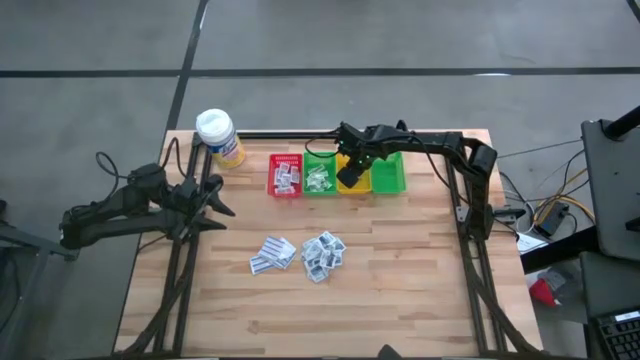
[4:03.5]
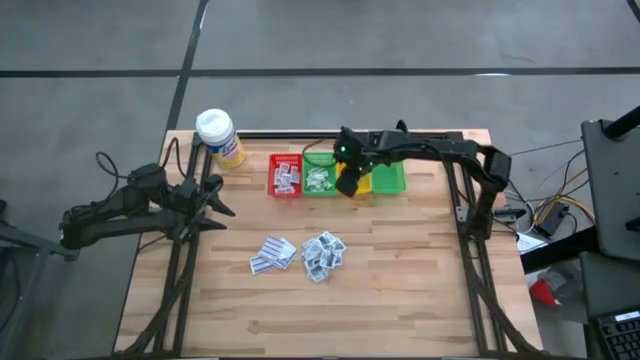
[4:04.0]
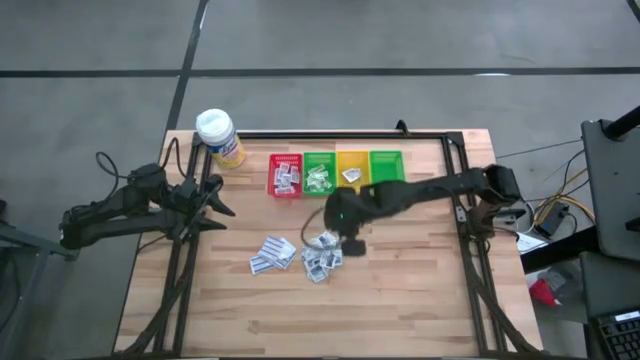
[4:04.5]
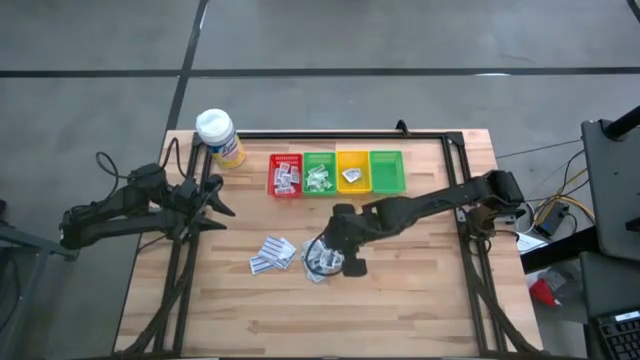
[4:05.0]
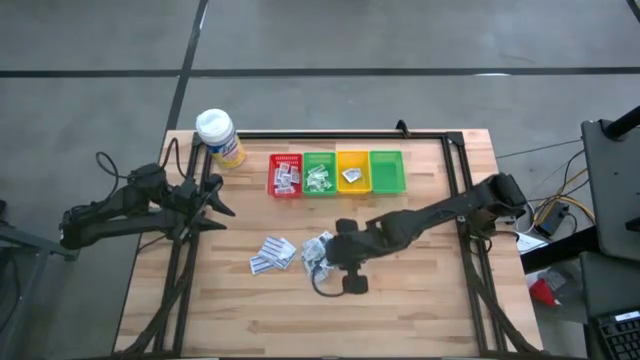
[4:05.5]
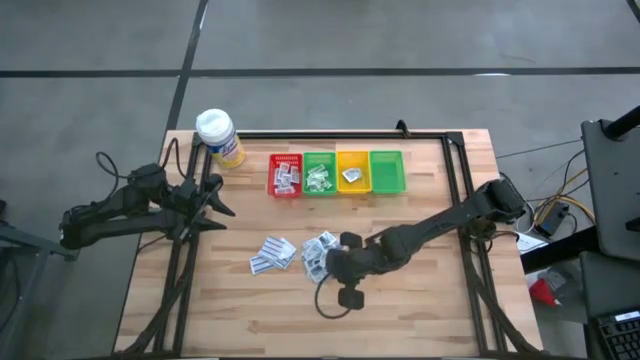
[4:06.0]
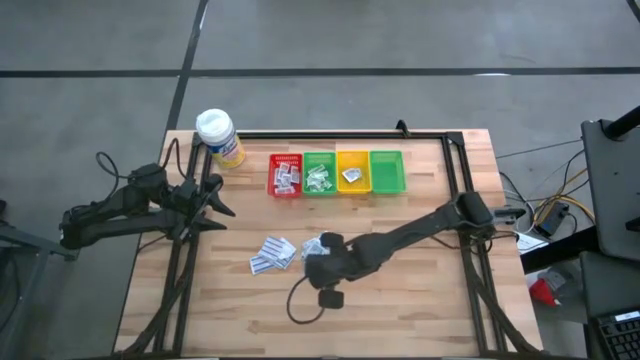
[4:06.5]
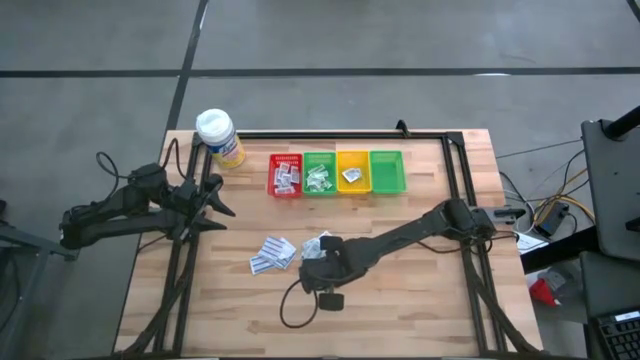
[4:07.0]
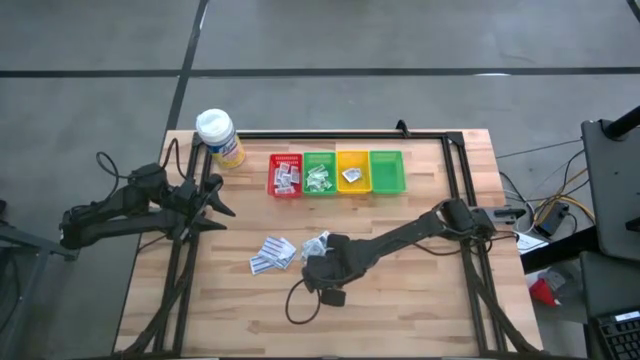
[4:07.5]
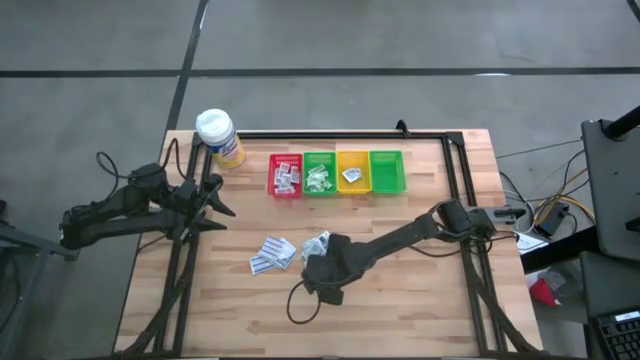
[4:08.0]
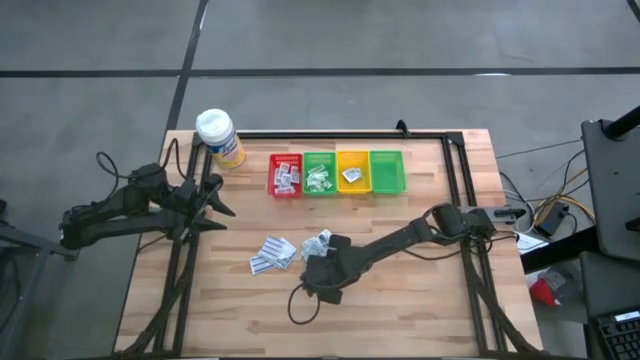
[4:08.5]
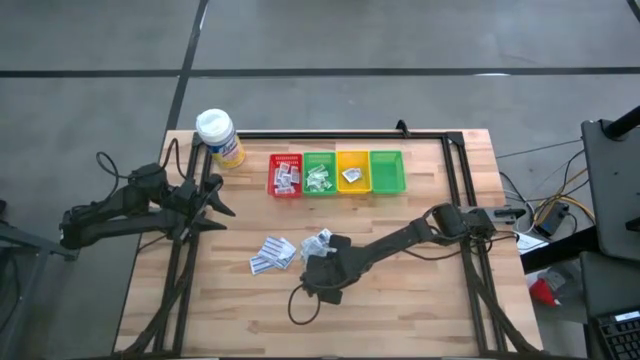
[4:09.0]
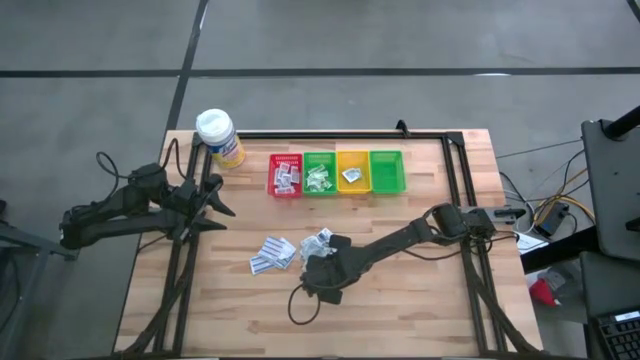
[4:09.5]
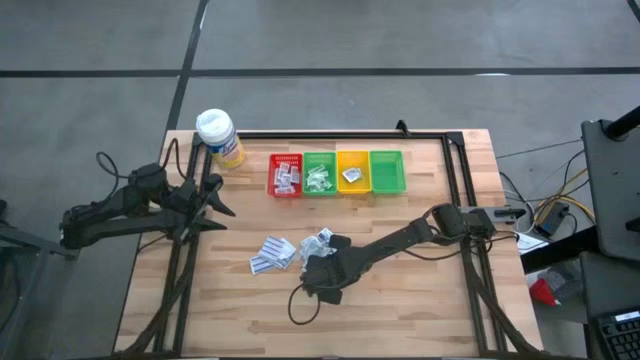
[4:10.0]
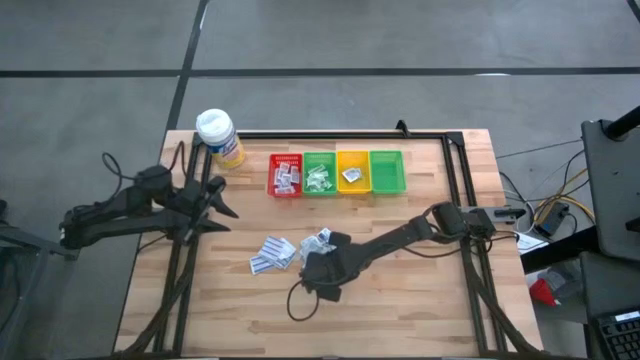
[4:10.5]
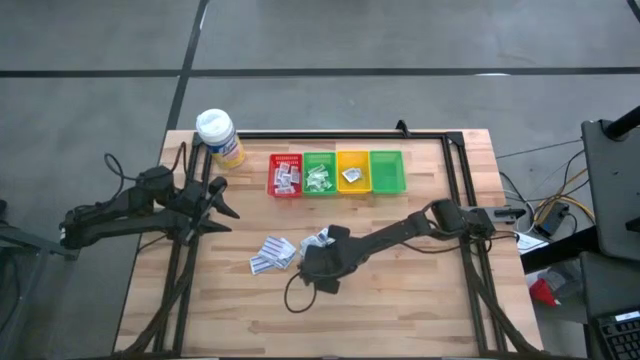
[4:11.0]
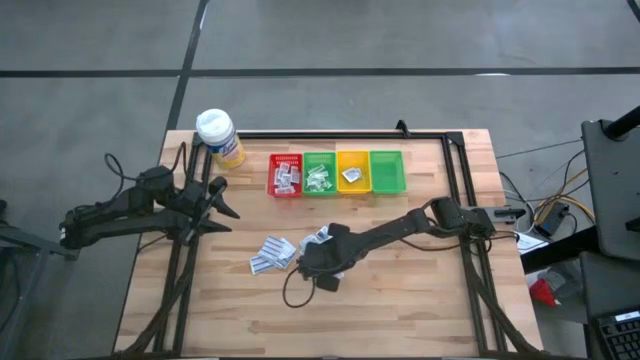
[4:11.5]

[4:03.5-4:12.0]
Task: Pick & Place First Aid Supplies
Put the alcohol pad into the yellow bin

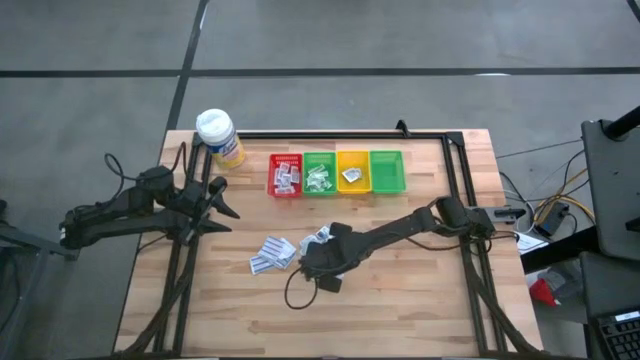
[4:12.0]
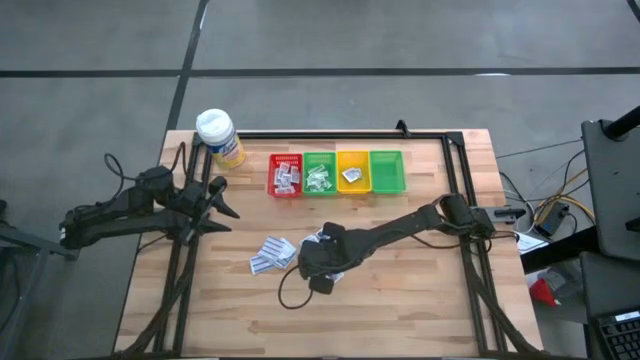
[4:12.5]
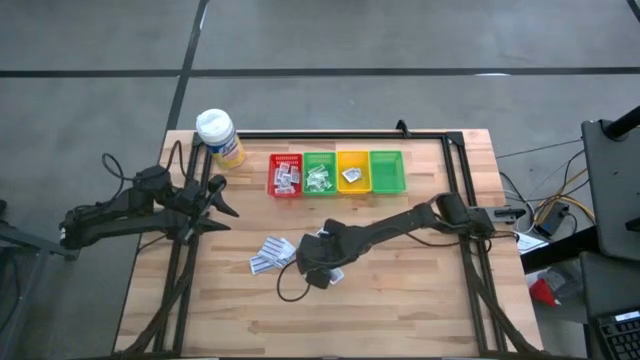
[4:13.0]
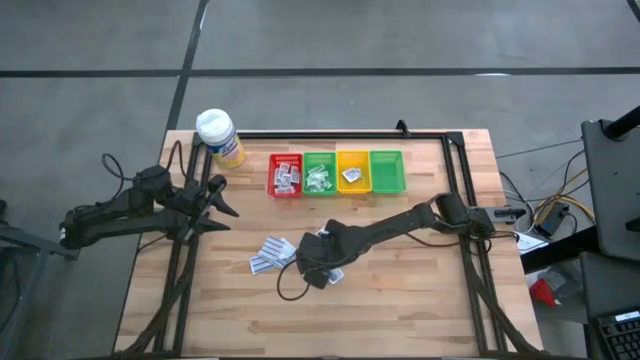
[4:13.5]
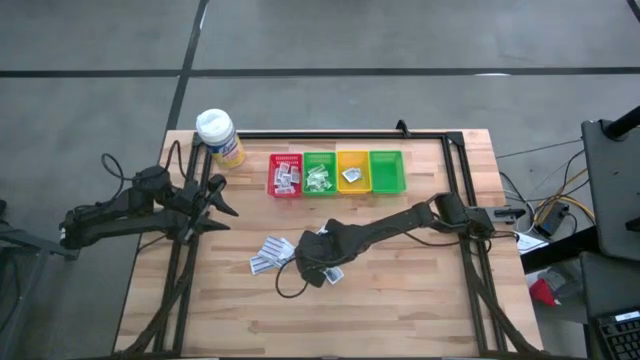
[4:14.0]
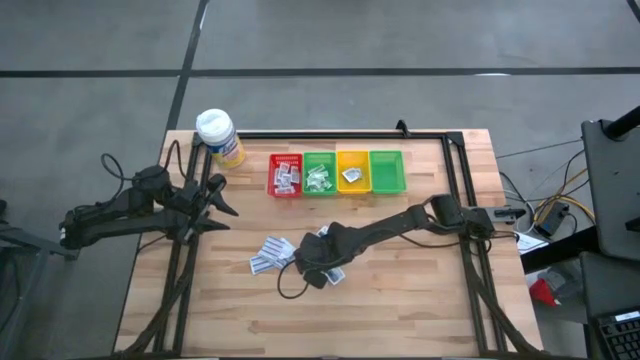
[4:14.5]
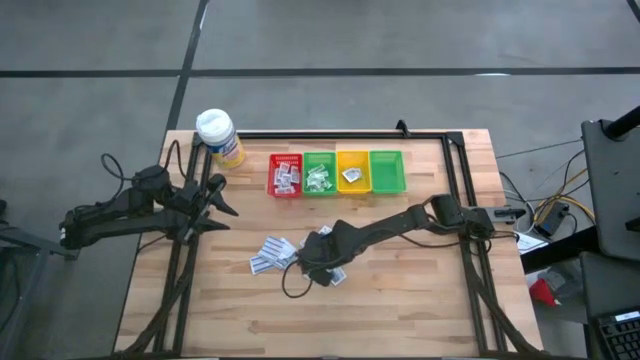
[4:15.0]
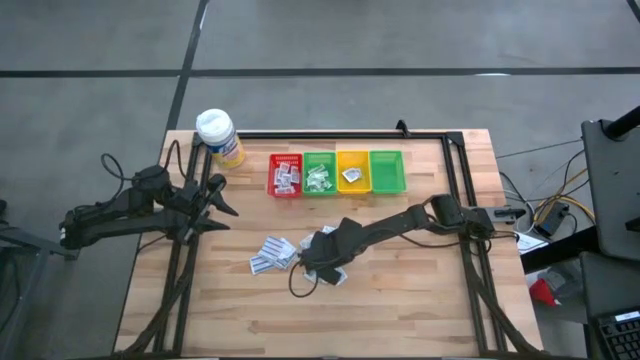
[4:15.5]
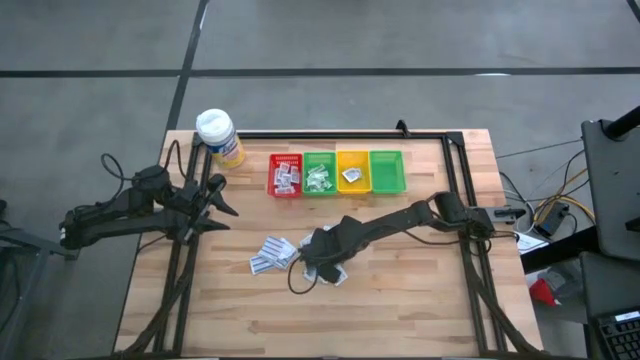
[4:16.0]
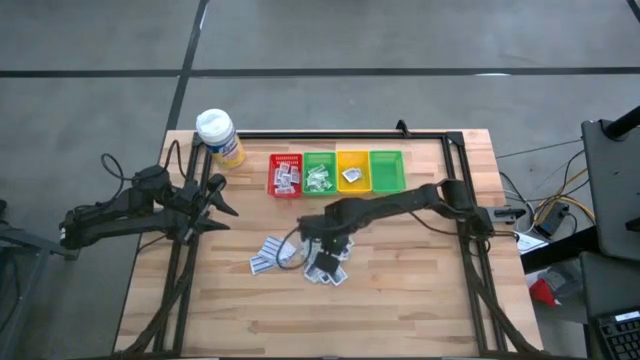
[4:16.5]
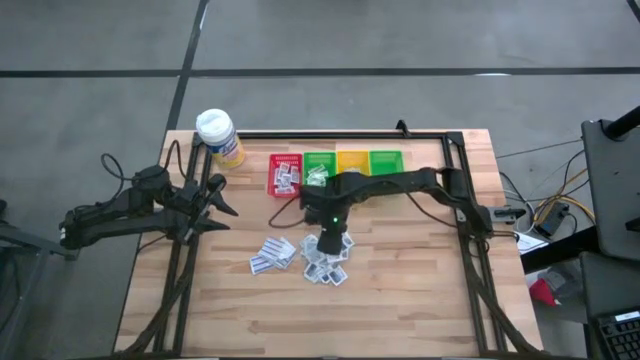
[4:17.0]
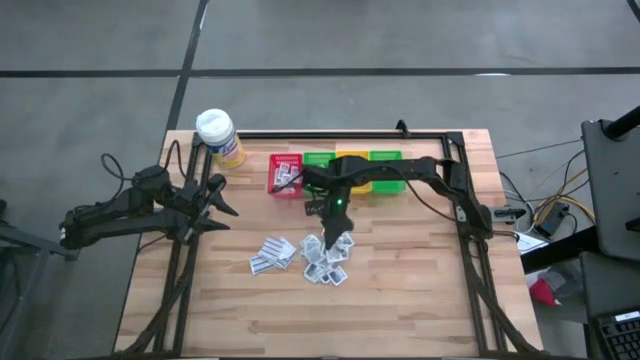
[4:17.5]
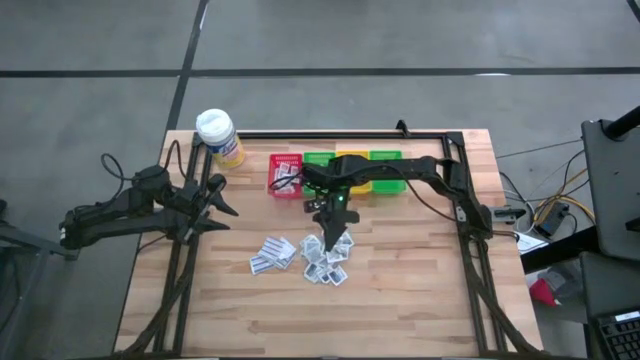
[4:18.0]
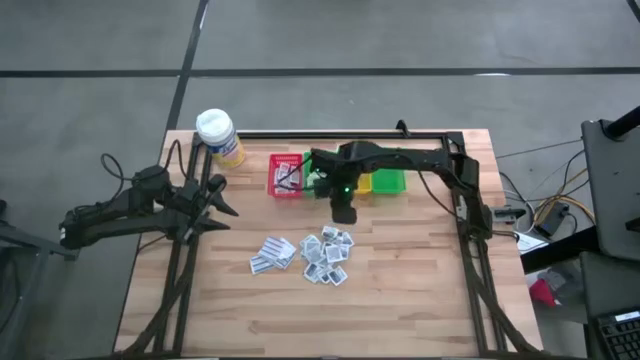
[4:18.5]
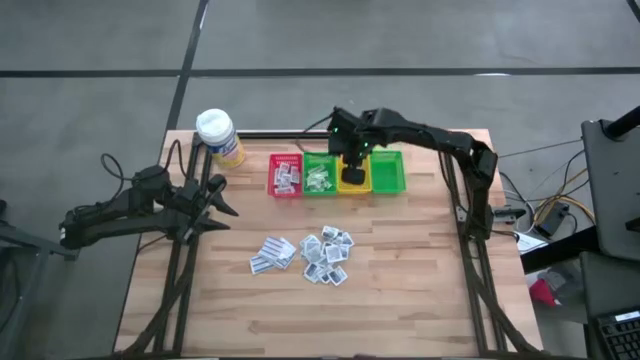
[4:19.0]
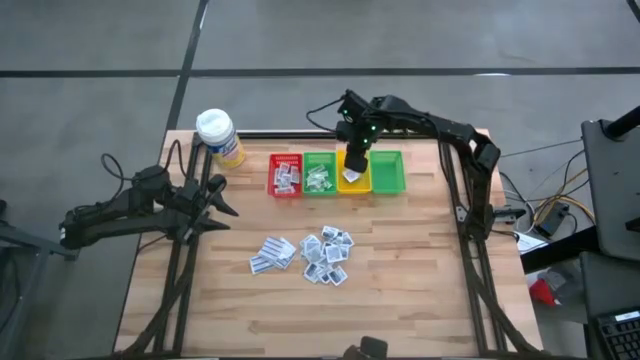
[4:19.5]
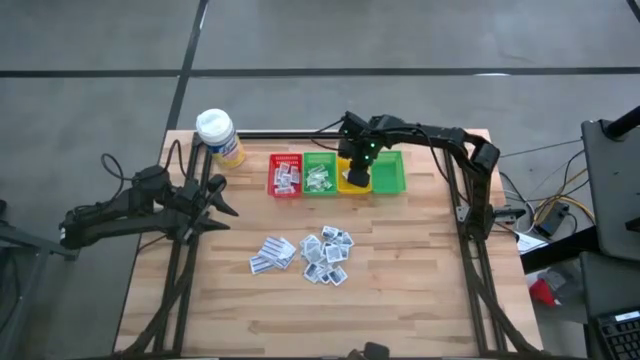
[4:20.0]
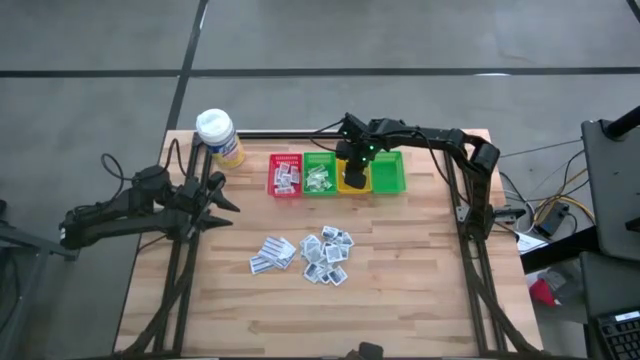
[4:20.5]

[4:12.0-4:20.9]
Put the alcohol pad into the yellow bin

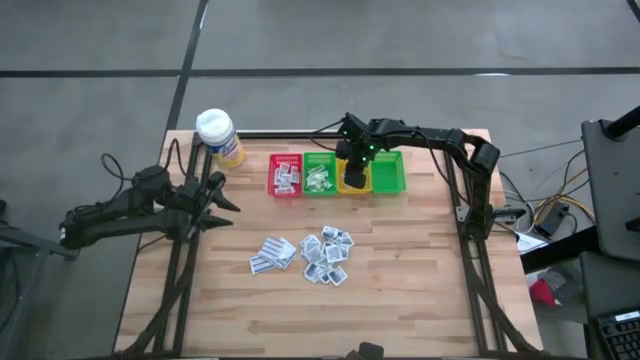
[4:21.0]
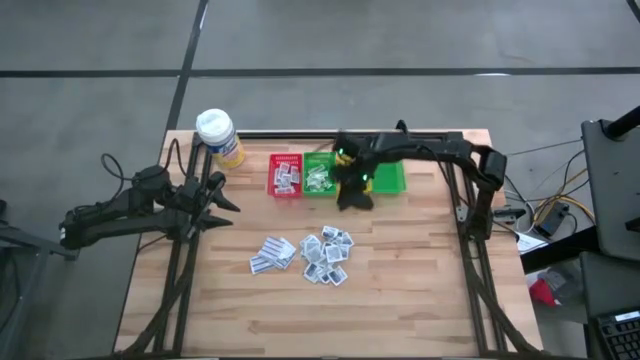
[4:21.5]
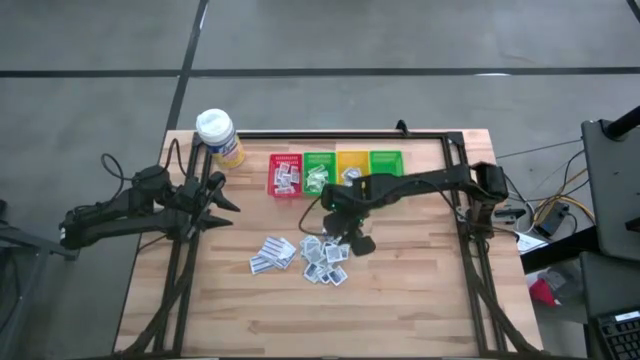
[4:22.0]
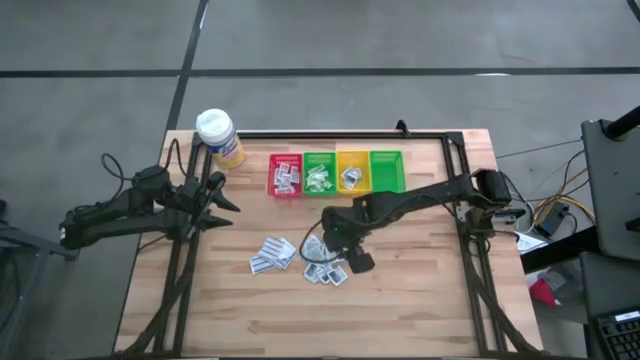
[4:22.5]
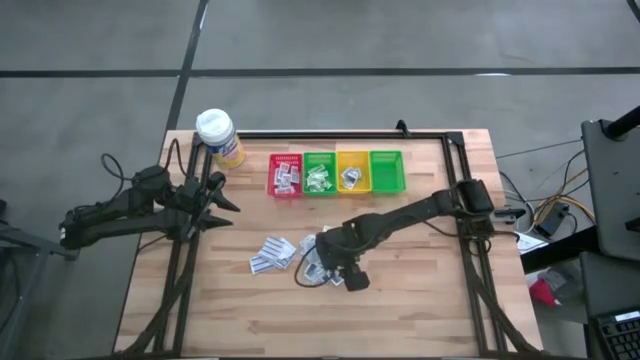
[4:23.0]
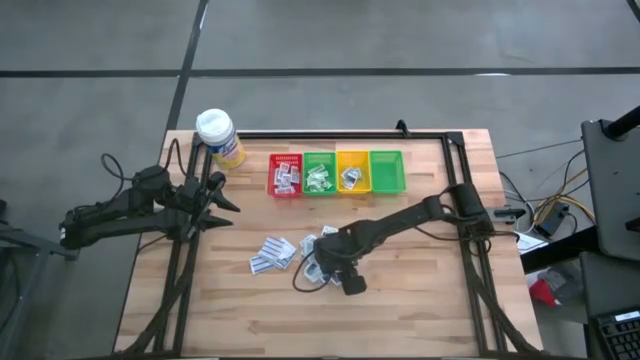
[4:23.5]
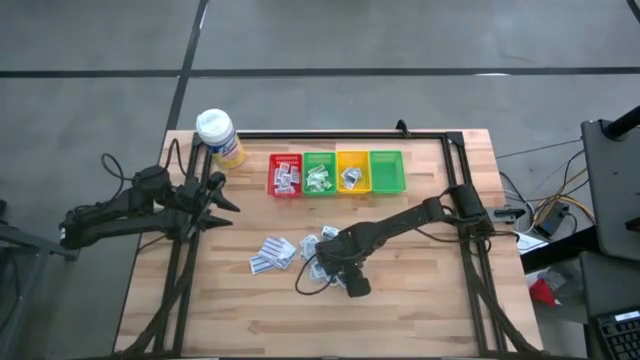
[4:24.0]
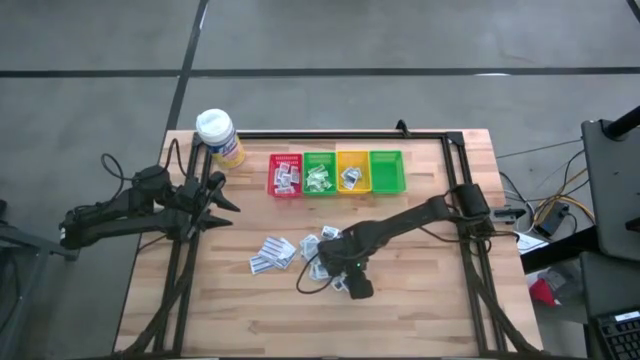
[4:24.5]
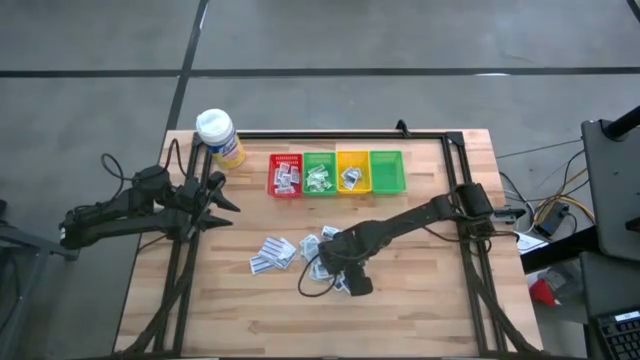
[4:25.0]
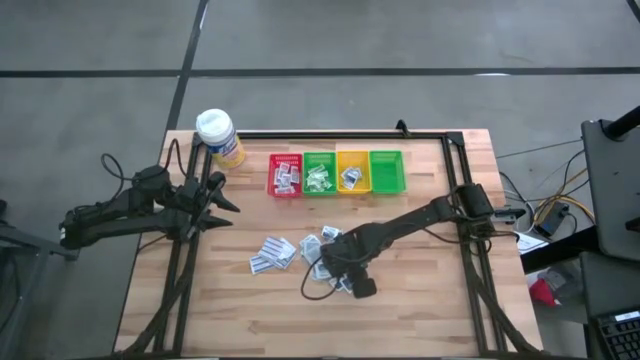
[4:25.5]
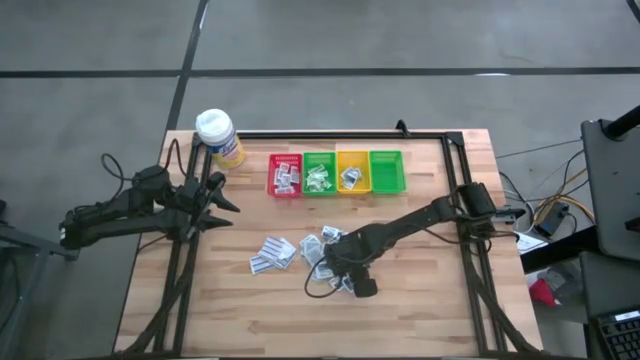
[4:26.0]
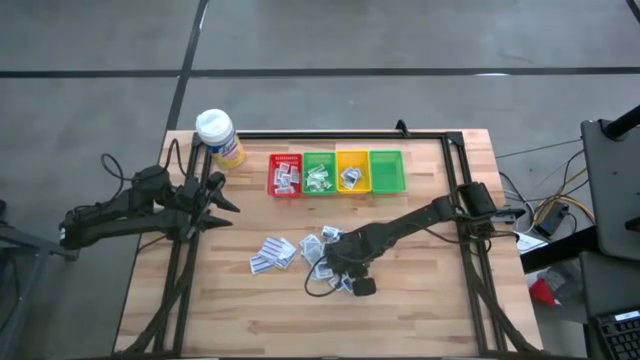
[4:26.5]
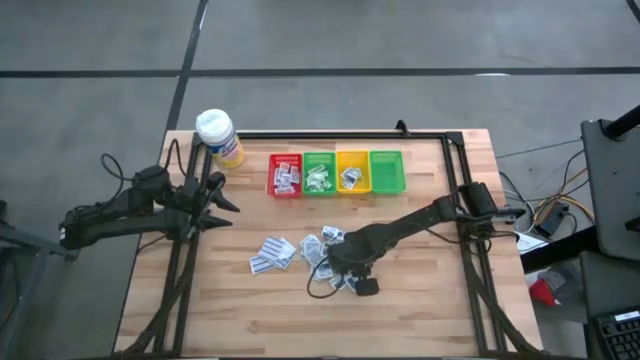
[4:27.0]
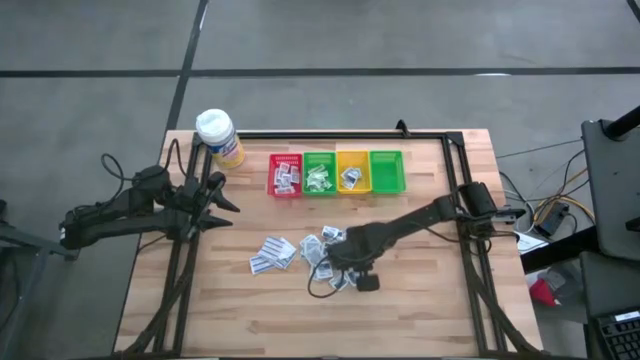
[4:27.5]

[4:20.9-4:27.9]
Put the alcohol pad into the yellow bin
